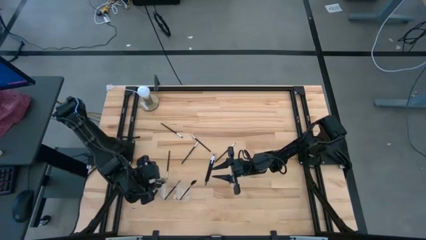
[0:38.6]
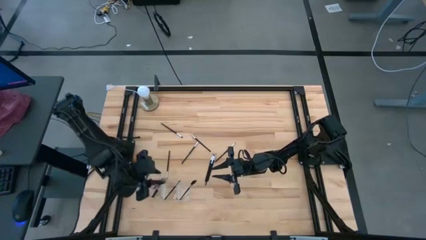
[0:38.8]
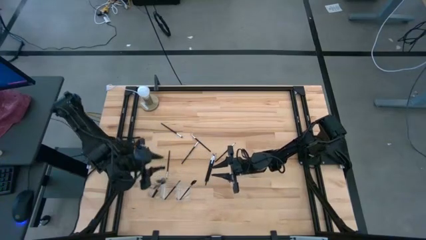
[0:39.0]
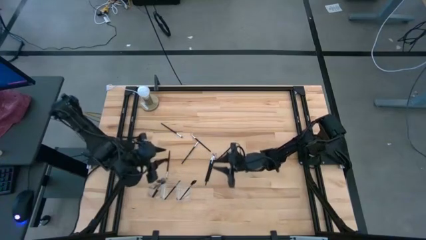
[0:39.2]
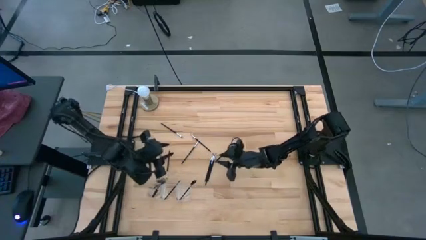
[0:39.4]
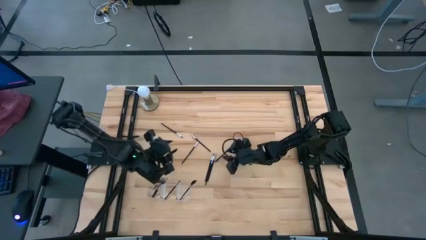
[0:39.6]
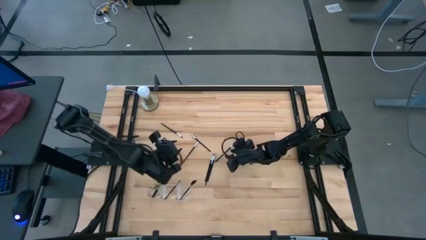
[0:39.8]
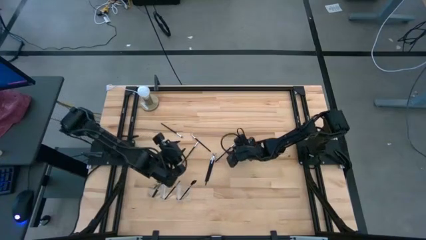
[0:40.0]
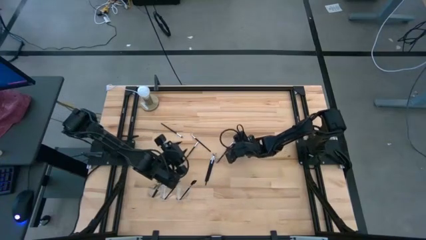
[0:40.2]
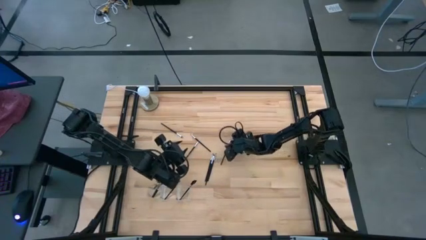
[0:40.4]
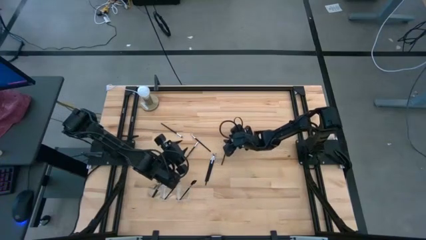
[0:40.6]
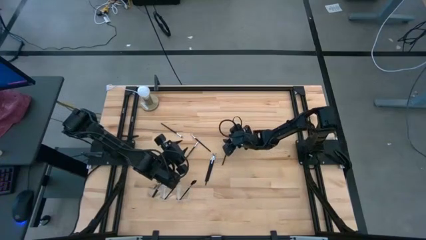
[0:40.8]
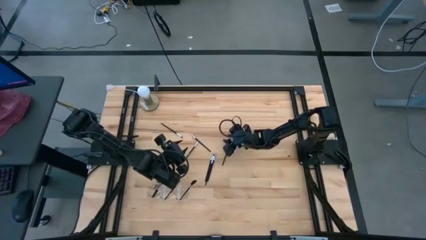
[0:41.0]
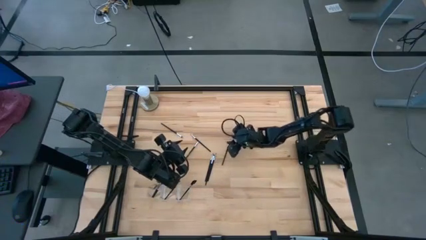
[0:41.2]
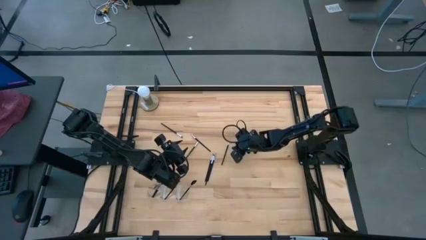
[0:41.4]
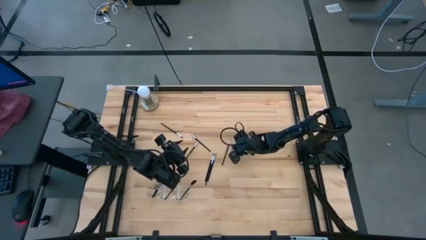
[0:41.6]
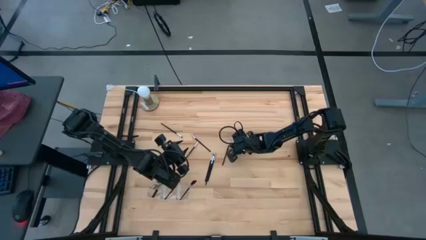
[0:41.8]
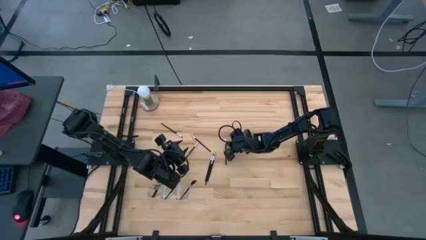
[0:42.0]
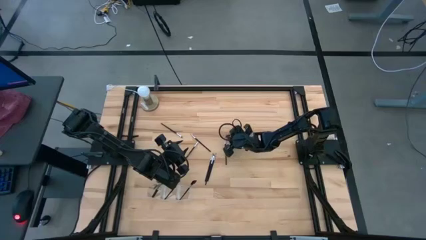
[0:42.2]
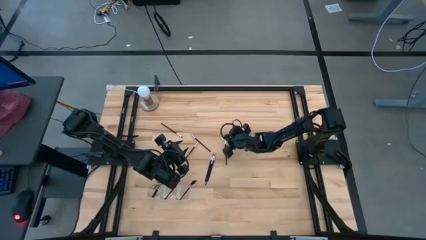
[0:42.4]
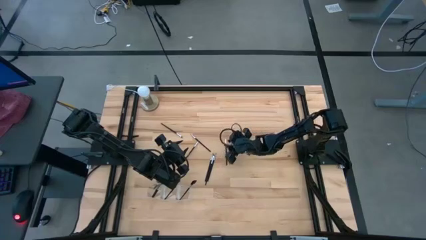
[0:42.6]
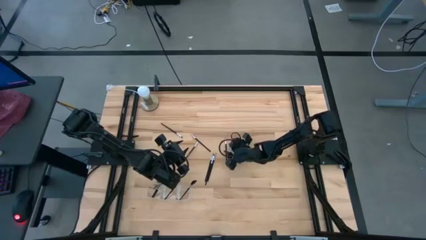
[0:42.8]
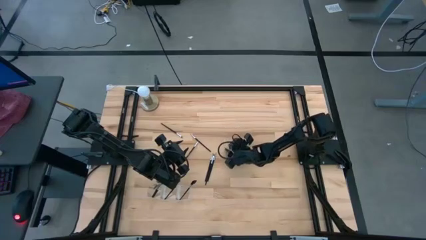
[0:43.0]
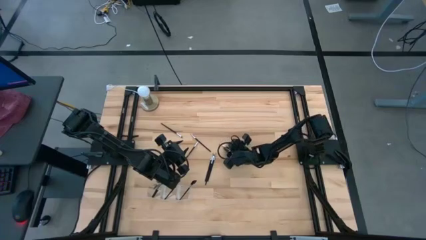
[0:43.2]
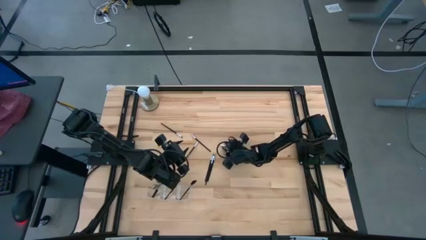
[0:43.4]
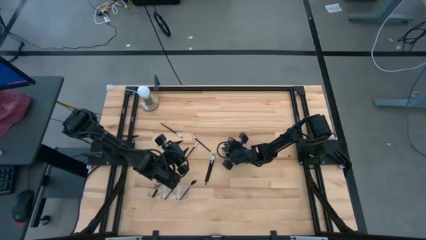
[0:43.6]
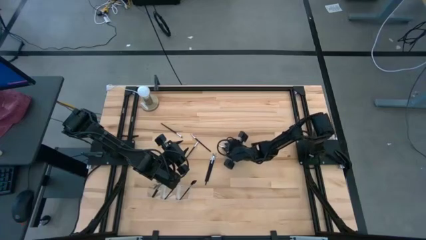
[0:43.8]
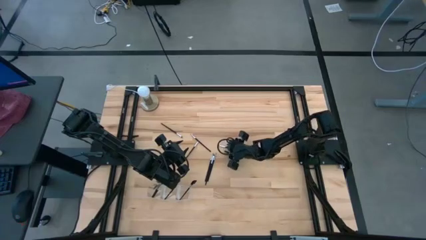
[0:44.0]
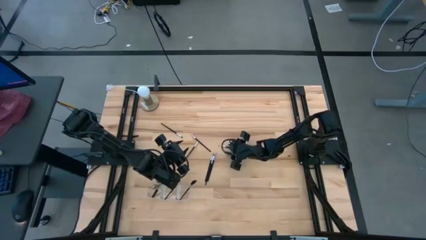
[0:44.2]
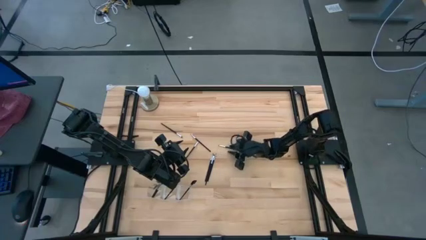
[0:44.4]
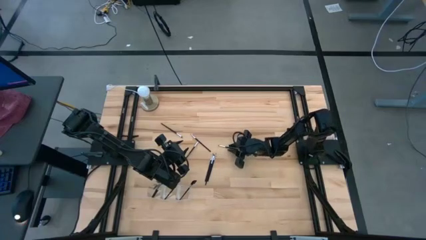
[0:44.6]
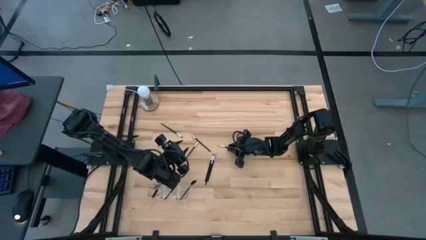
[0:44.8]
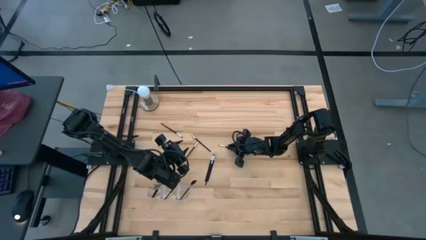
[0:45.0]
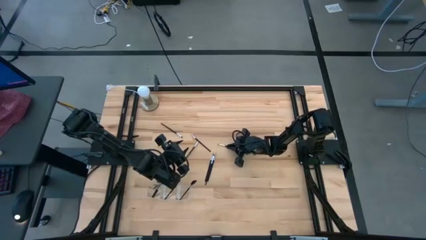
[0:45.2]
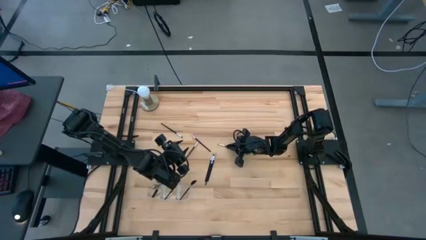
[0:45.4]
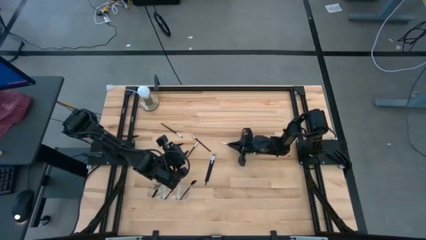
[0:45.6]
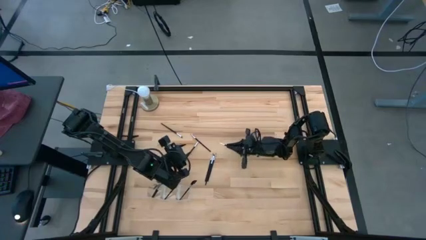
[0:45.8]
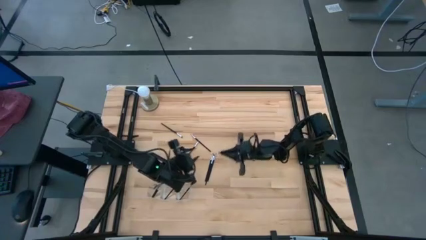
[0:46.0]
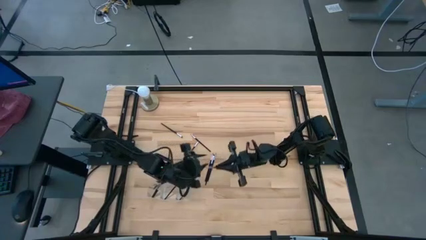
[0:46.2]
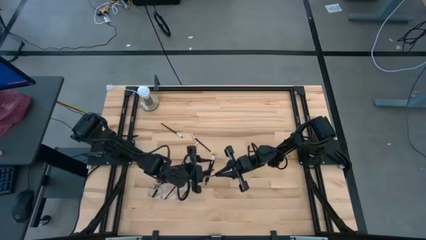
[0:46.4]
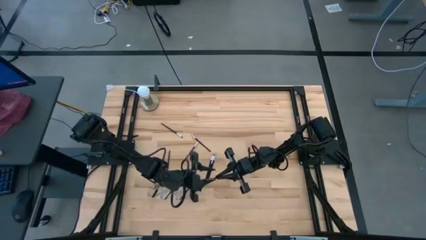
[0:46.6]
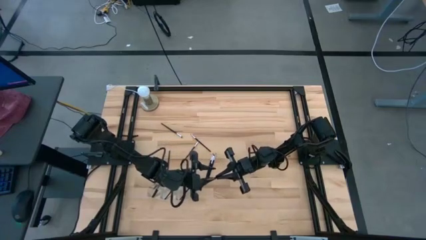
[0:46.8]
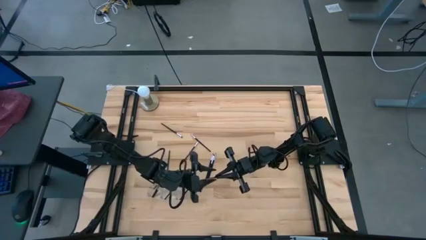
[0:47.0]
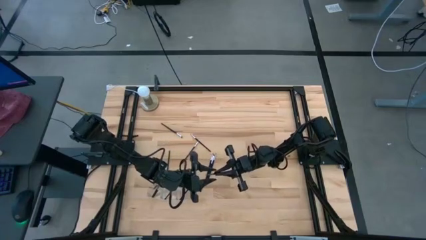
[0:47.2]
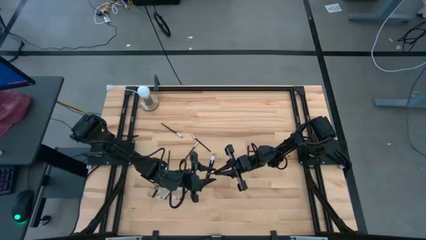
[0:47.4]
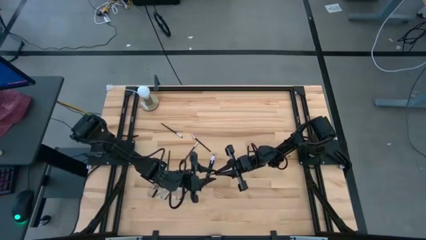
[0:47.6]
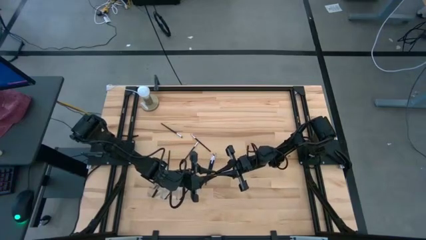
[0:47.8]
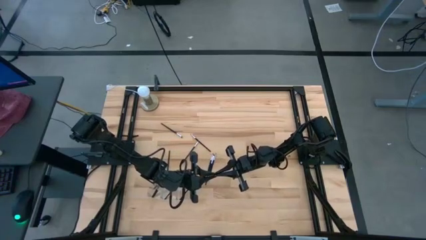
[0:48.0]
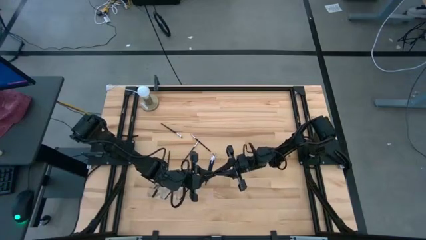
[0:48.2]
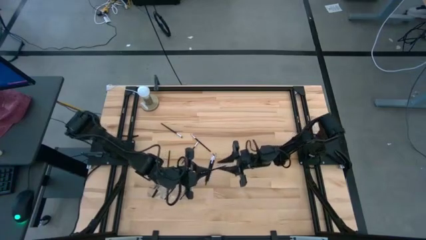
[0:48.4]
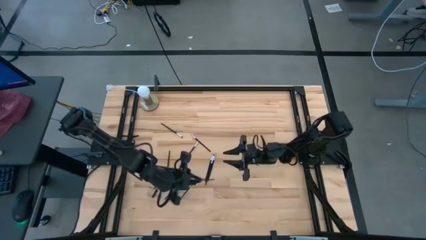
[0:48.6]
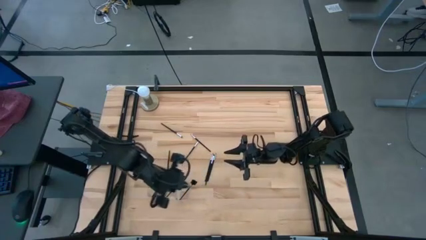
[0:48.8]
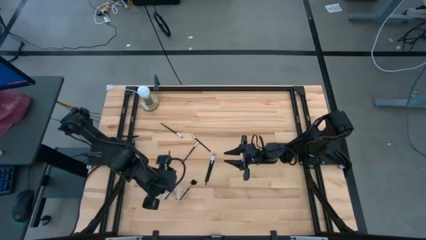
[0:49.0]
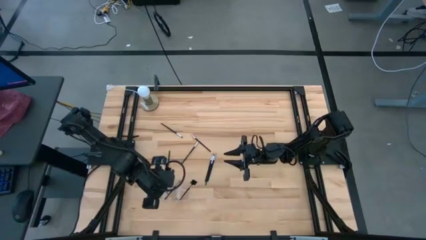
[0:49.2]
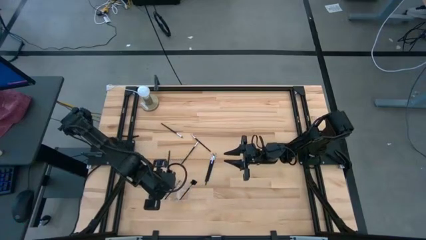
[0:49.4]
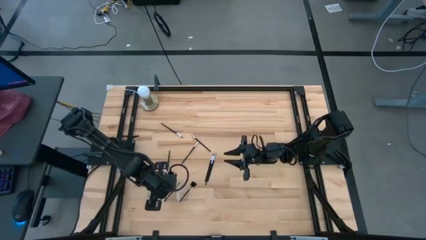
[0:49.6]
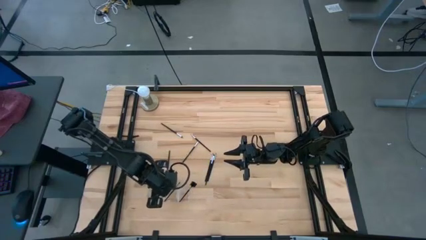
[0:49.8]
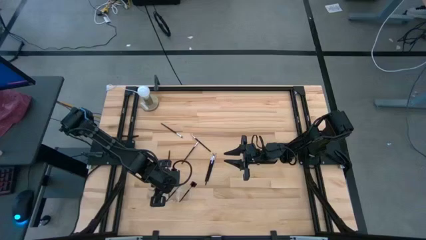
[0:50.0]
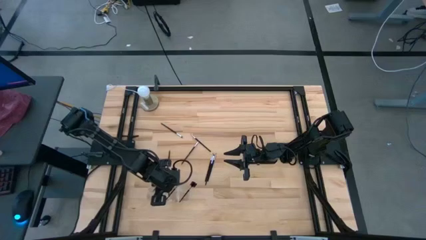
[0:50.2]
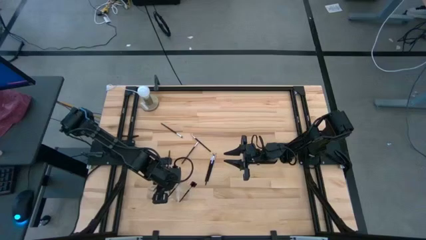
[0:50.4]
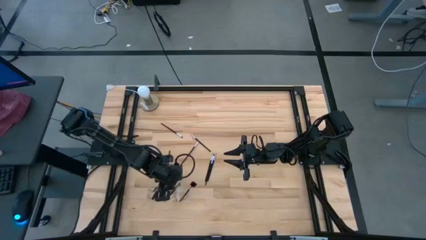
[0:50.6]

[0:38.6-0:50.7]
Task: Put items in baskets/containers
Put the black eyeshadow brush into the transparent organizer

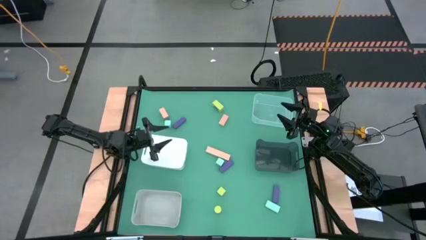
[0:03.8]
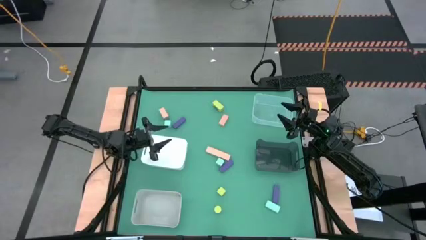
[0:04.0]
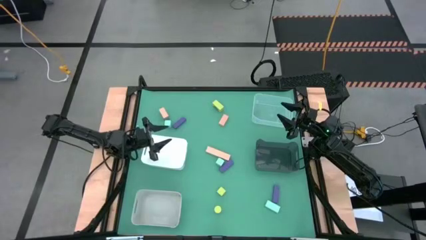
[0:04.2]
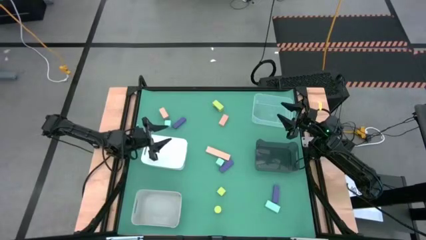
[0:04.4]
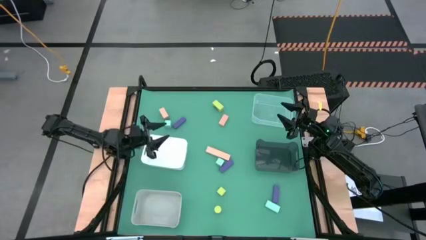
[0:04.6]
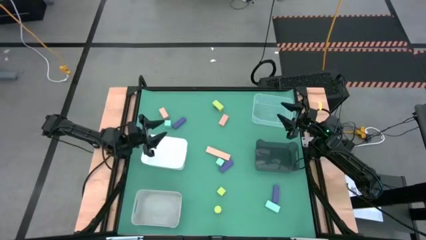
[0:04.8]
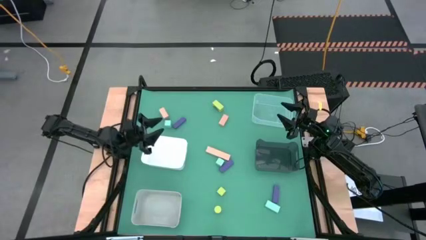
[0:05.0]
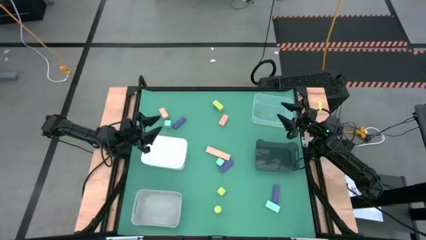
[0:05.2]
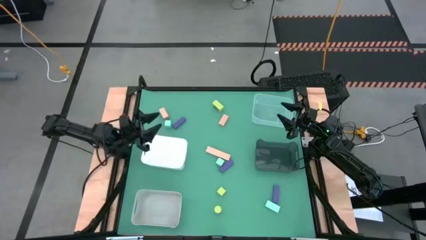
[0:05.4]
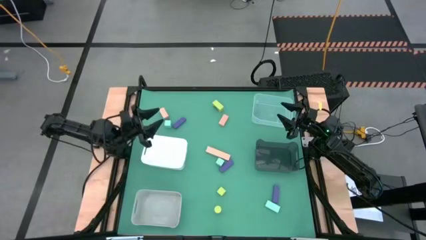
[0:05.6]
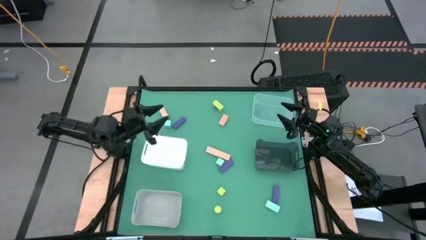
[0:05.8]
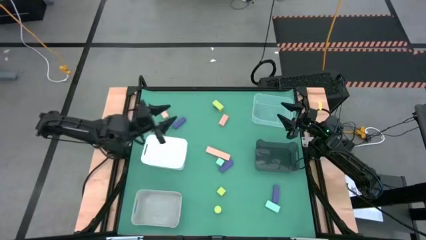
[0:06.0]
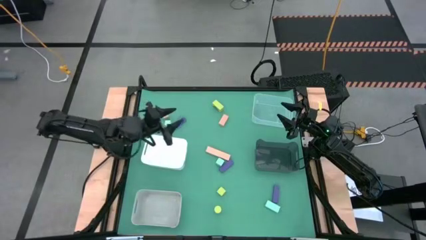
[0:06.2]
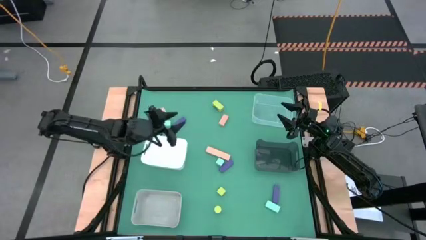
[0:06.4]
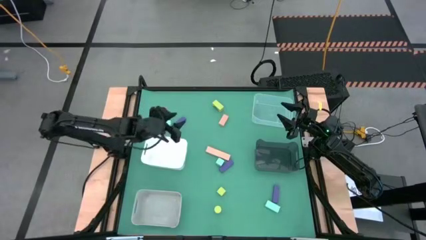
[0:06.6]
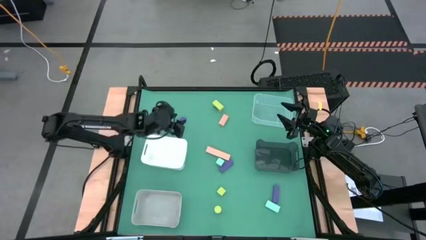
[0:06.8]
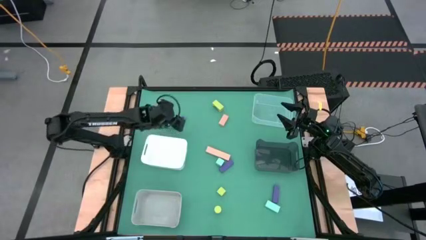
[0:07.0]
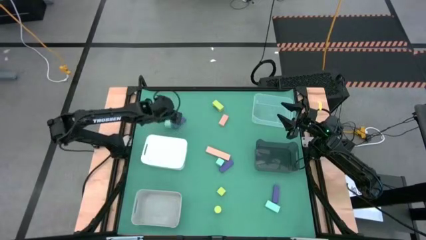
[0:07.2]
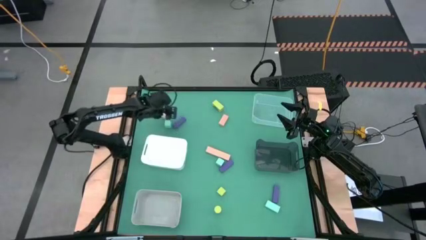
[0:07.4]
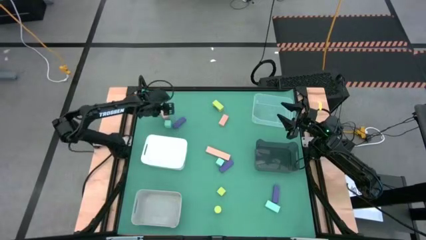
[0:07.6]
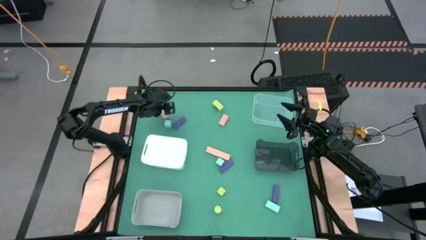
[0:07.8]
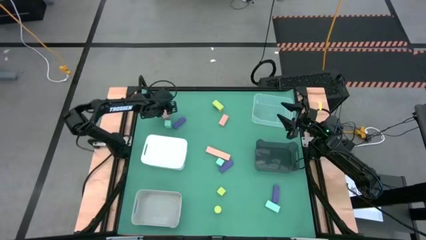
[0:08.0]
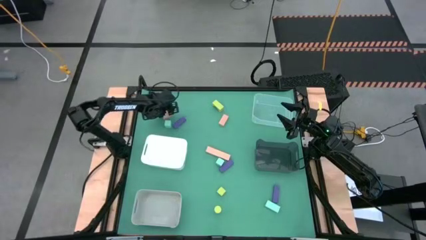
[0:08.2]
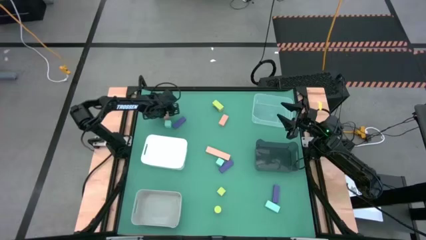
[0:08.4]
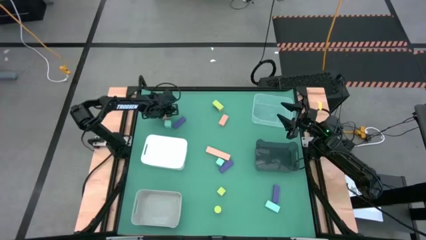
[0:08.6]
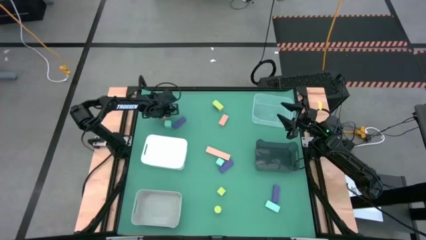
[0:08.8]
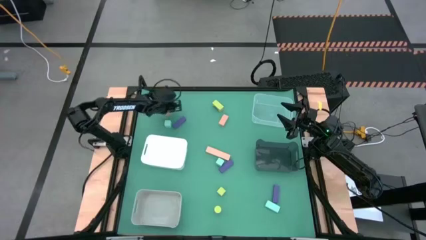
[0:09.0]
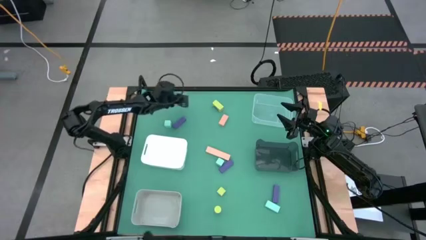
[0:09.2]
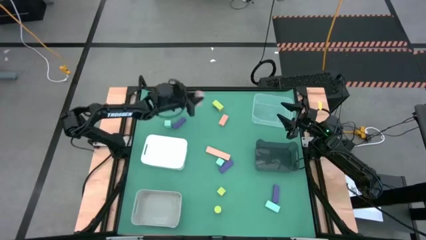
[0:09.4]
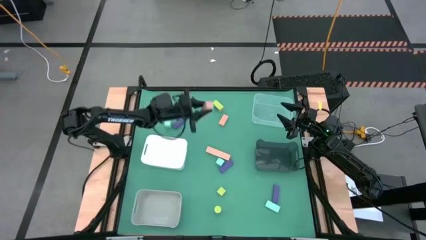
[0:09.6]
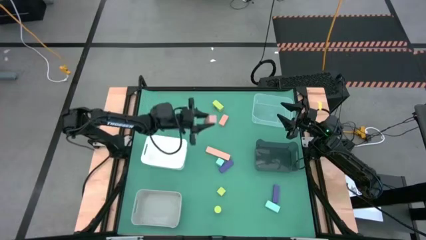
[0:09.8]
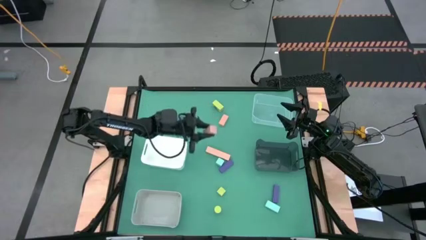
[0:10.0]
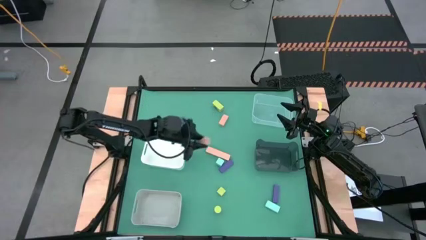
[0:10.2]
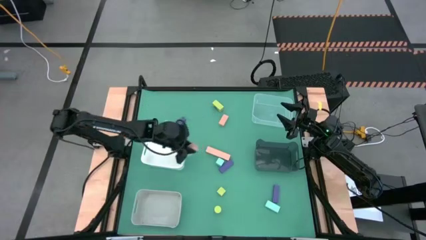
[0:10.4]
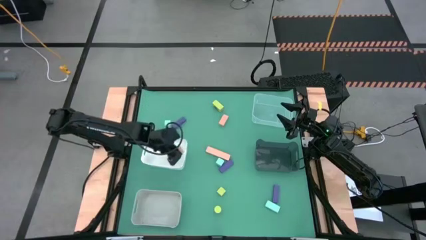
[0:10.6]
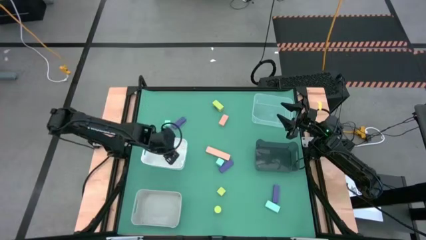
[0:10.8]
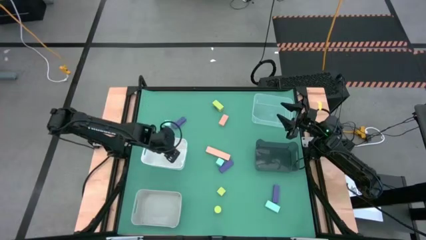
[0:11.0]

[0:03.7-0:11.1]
Task: Sort & place blocks by color
Put the top left brown block into the white bin
